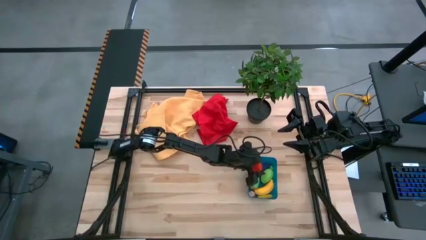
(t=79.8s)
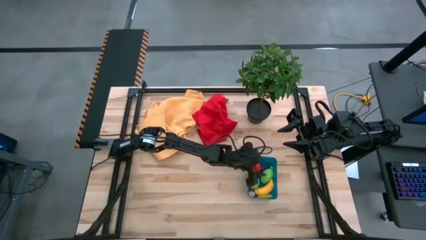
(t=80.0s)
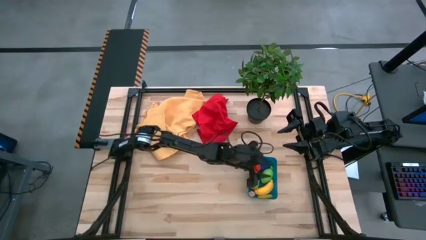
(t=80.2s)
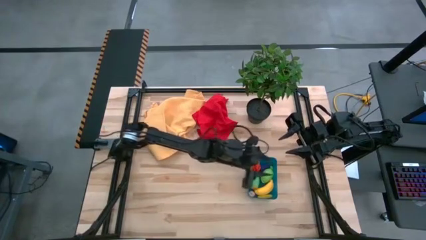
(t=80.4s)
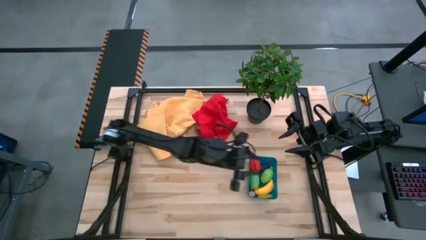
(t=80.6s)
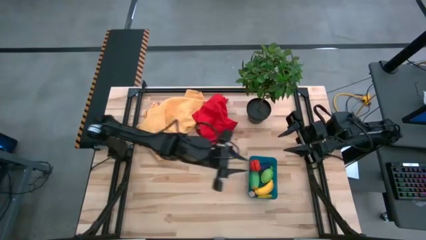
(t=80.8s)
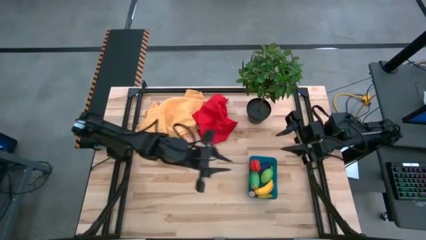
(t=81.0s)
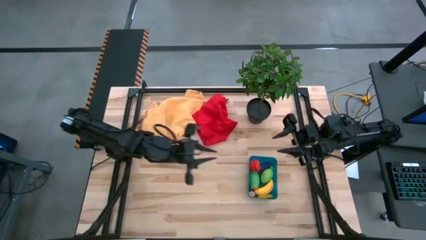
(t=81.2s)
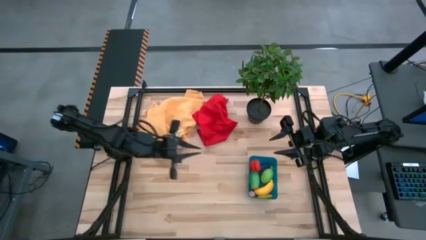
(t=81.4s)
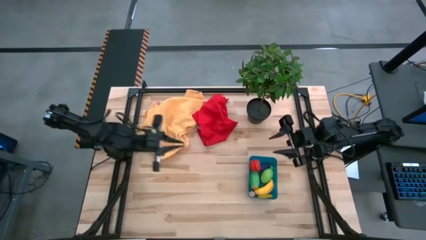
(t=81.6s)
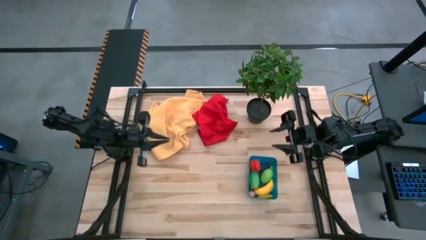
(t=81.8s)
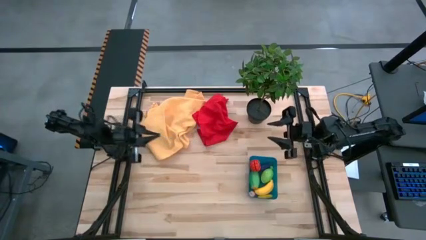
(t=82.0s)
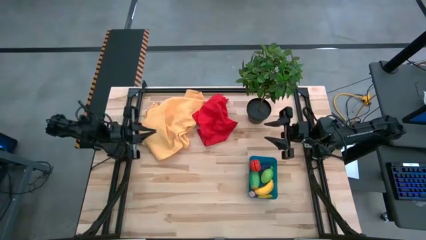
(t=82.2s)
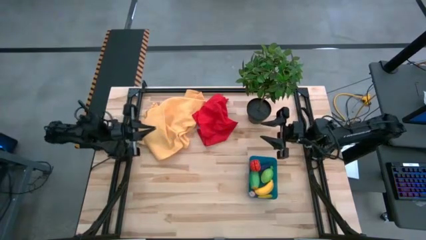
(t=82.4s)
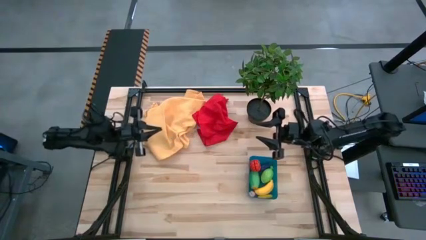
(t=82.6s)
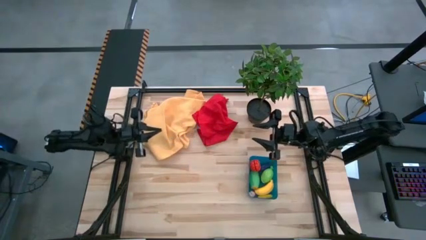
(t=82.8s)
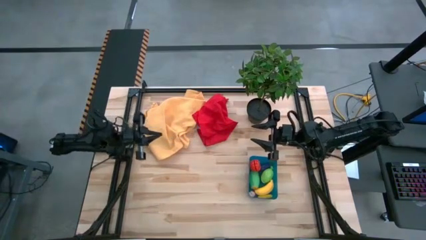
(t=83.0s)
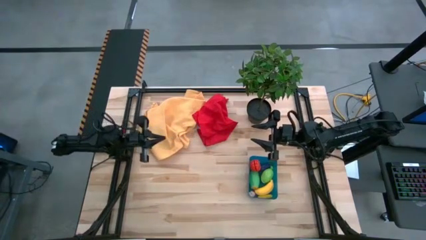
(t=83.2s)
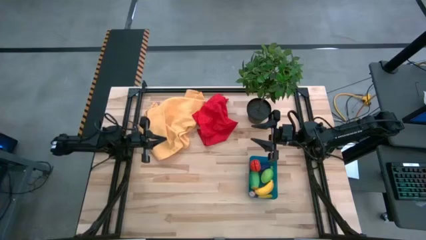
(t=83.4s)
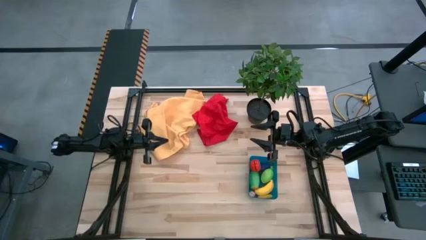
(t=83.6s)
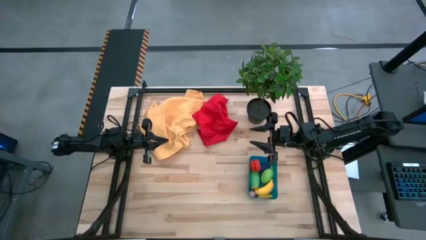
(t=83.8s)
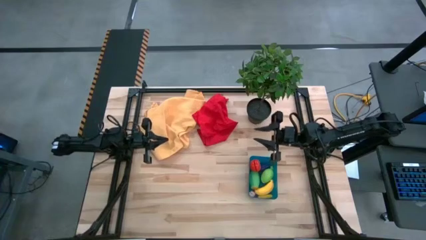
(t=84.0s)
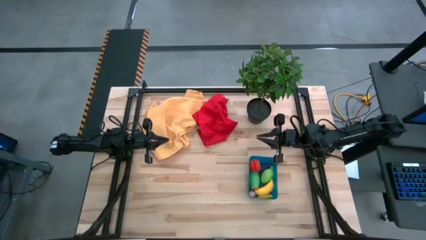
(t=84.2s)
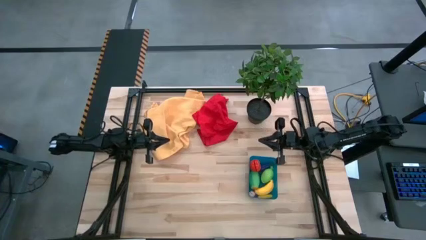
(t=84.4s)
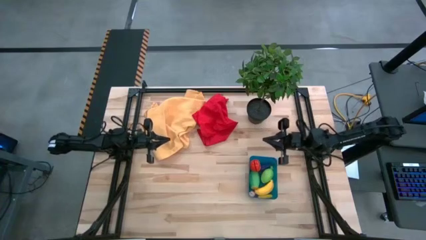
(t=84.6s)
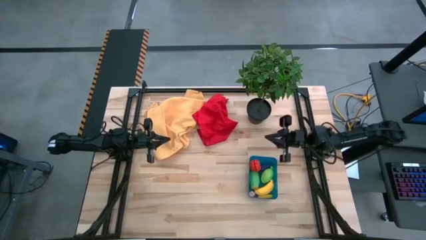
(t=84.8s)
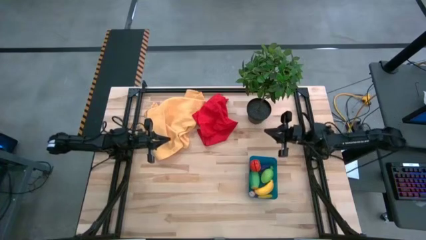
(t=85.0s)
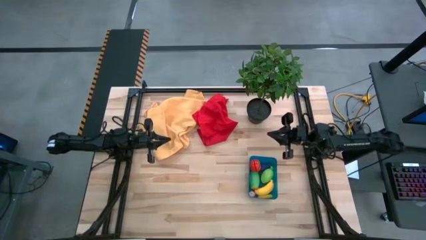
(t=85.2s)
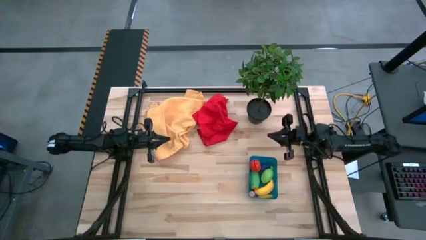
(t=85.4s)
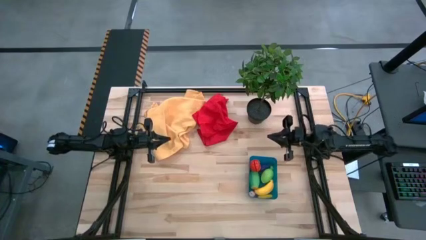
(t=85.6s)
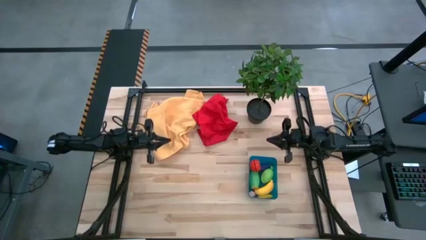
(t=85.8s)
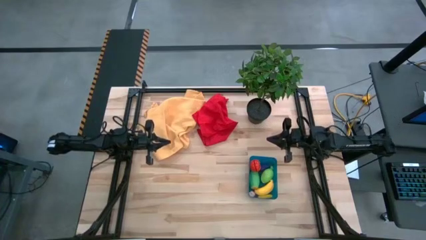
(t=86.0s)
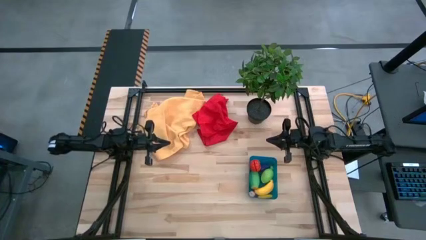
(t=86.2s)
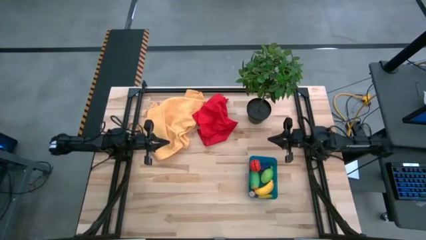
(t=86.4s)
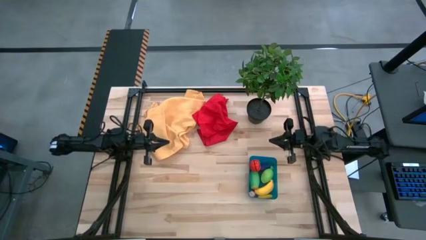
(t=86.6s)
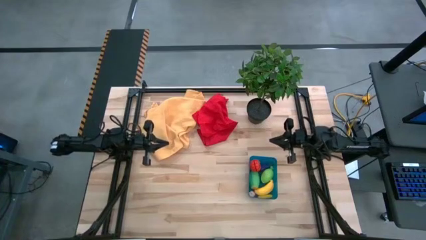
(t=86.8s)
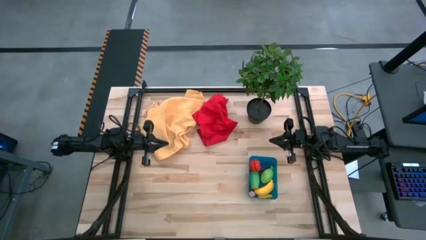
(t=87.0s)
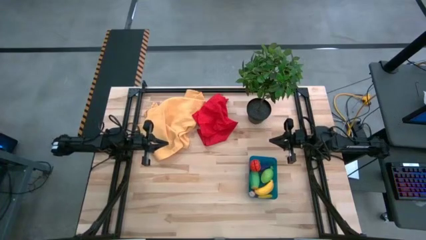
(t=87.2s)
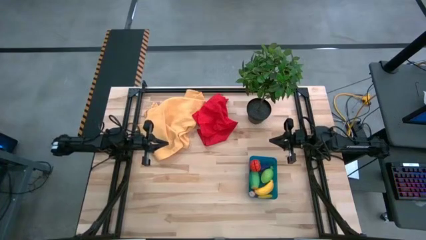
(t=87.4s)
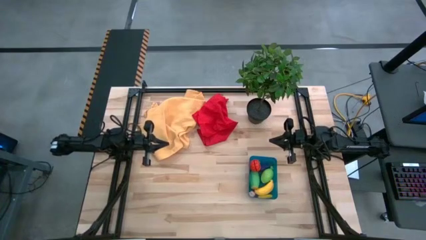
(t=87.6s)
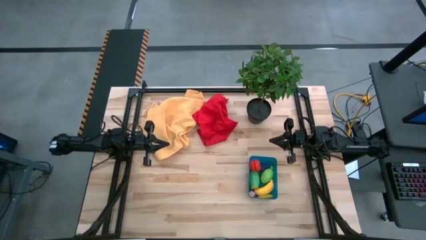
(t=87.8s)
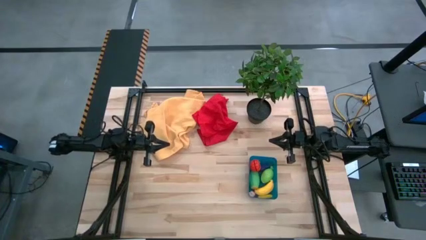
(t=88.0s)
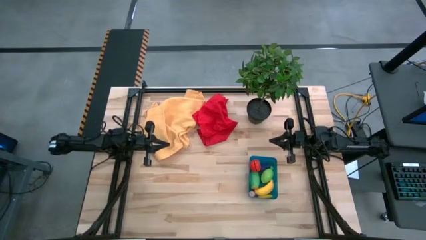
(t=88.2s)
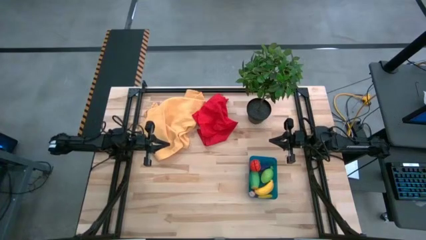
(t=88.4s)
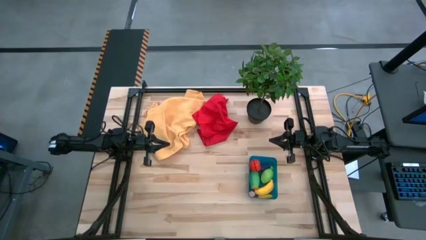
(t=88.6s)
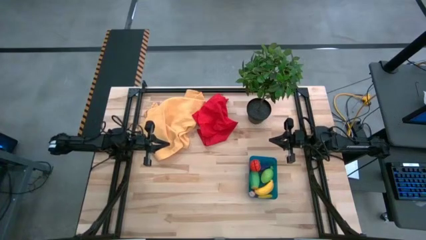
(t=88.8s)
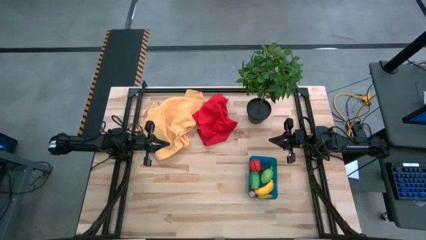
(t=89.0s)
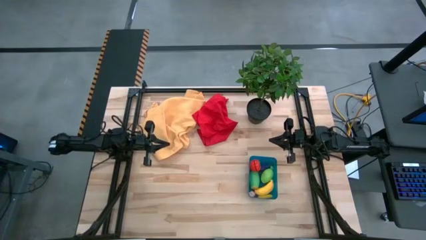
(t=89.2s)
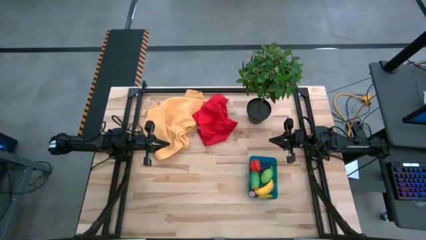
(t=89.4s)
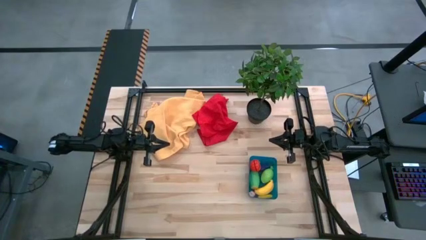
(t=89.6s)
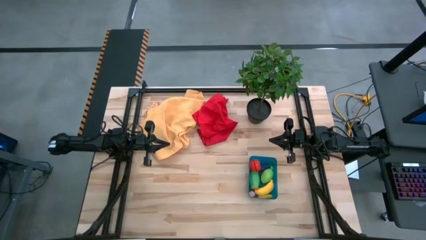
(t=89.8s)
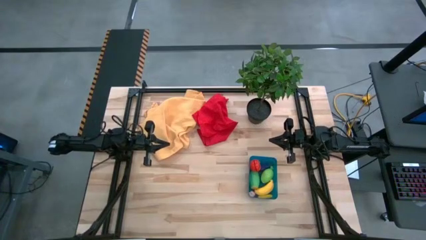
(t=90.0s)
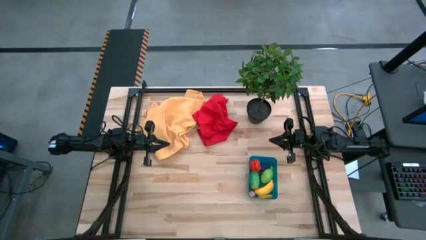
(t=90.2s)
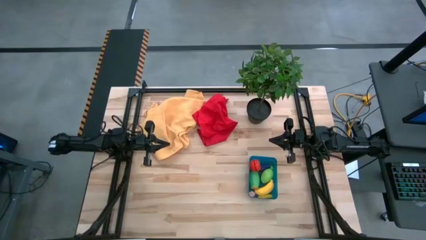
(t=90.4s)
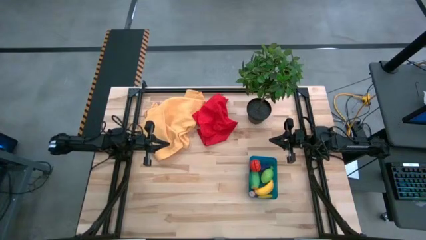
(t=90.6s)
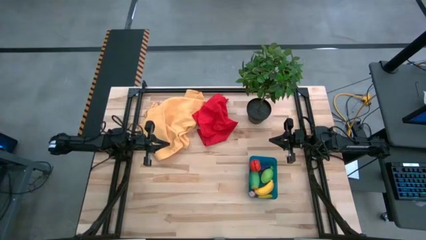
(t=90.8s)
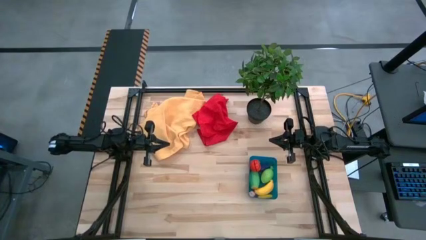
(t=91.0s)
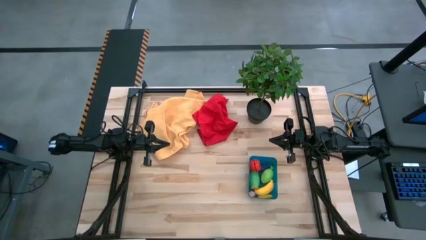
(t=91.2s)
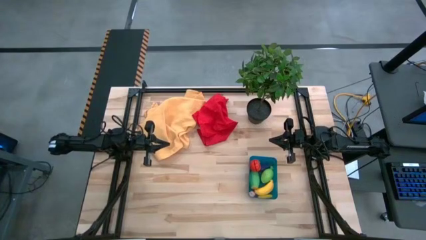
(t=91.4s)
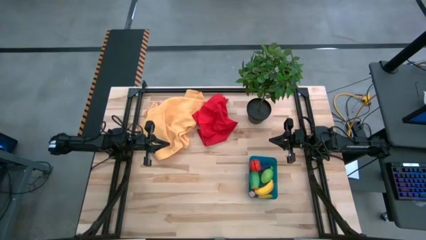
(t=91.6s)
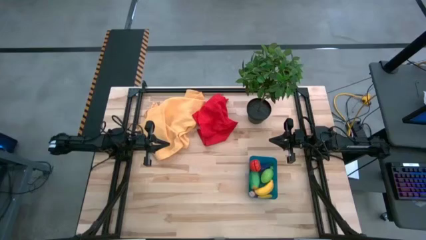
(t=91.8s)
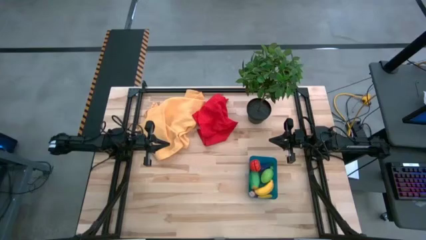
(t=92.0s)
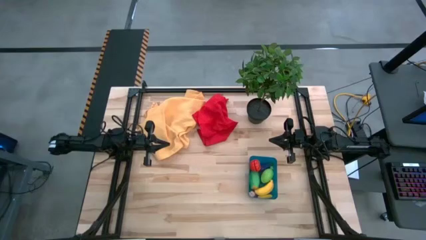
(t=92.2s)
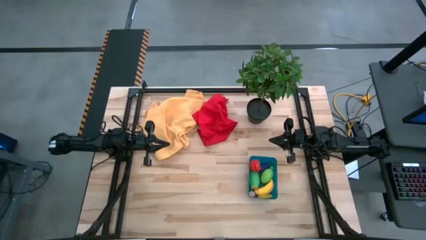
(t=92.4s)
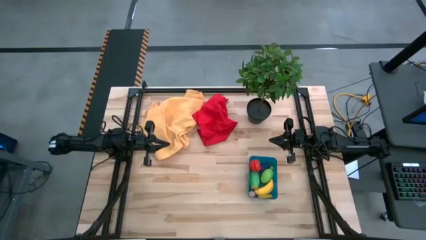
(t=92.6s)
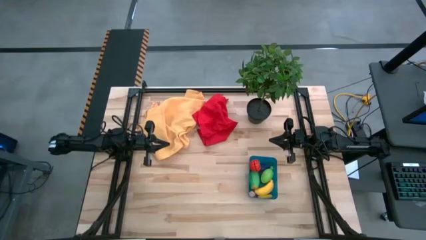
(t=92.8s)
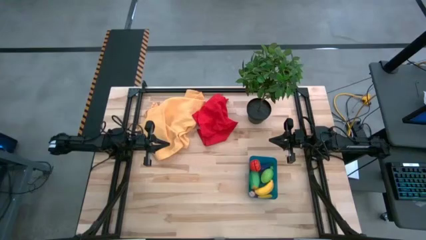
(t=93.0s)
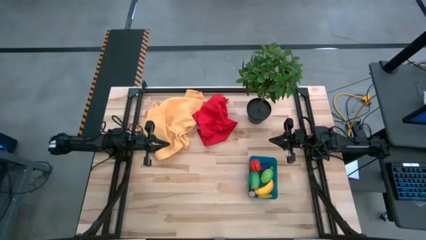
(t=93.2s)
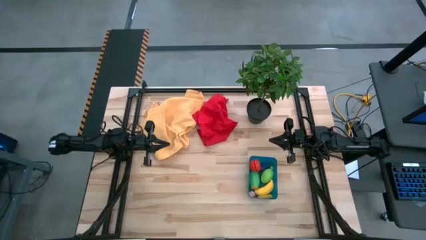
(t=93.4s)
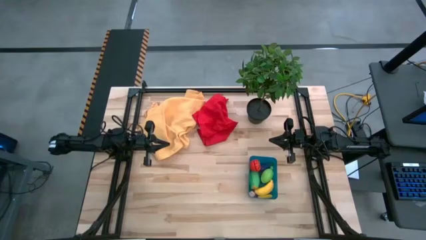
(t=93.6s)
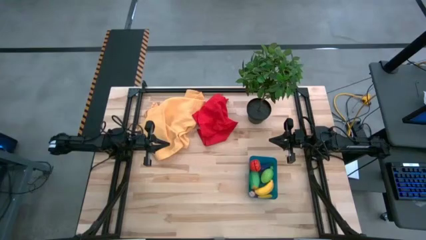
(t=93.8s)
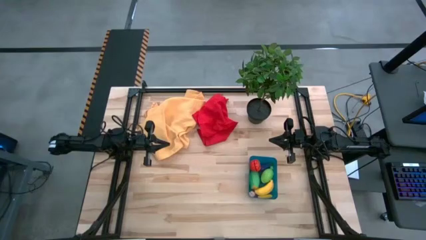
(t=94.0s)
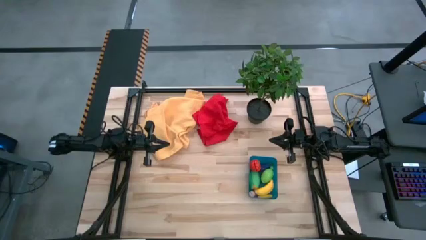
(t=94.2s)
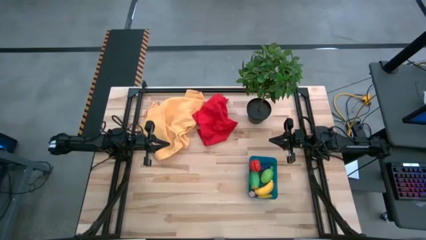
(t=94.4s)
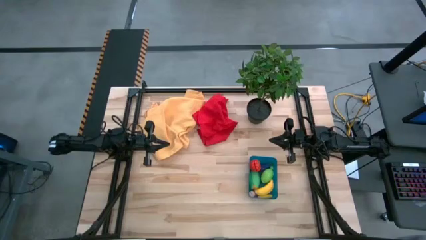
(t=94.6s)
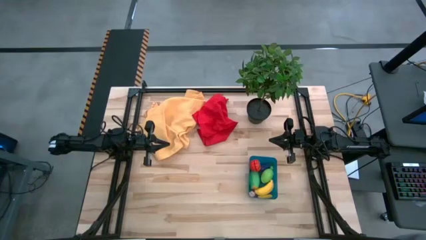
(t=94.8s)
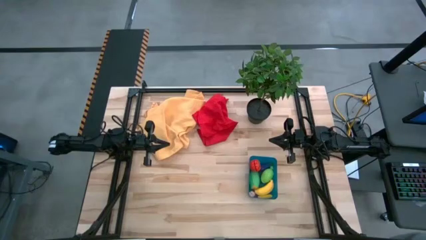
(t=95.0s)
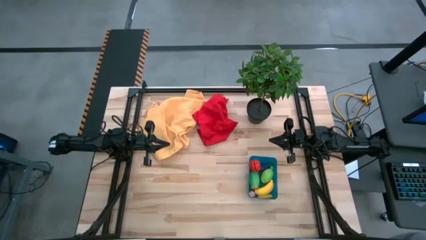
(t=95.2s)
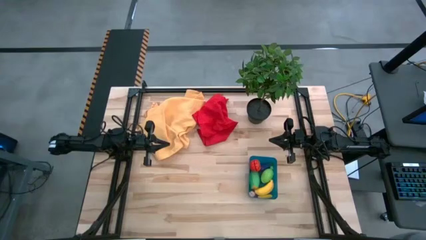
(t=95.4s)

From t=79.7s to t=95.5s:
Task: Pick and placing Produce into tupperware
Return to Home Position
